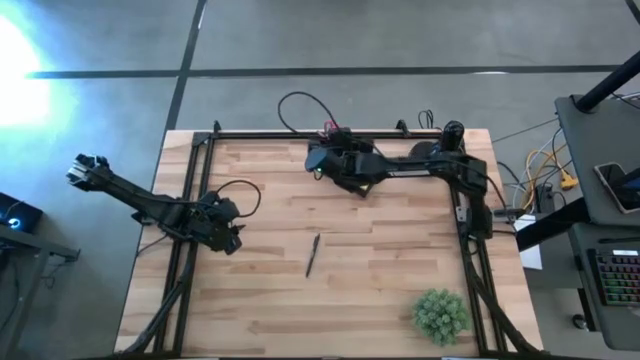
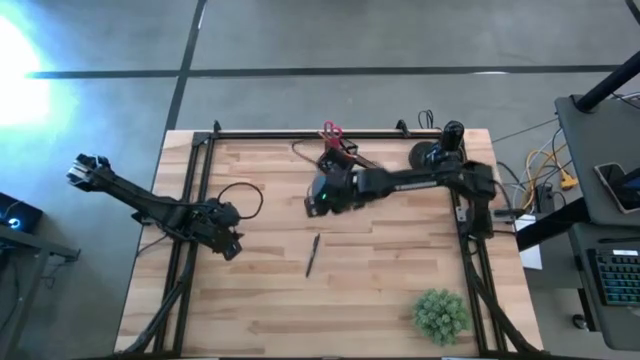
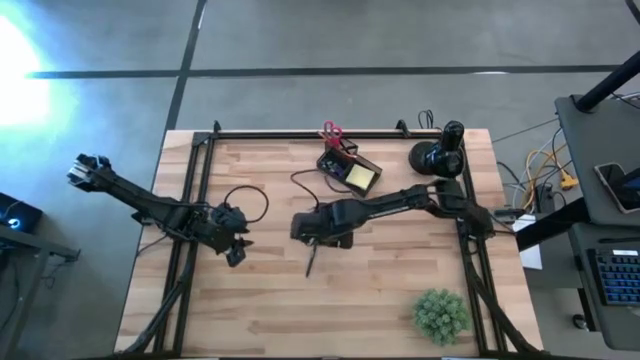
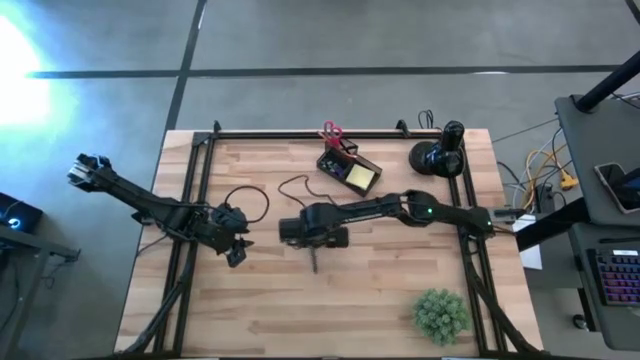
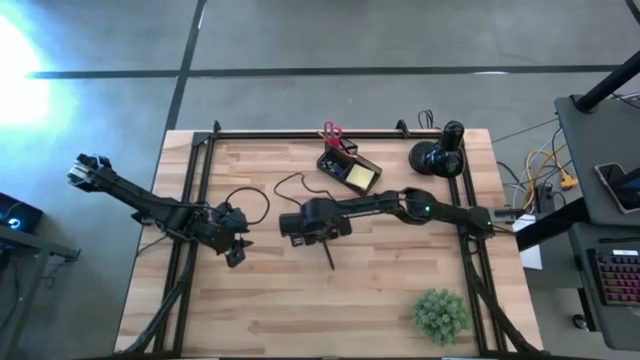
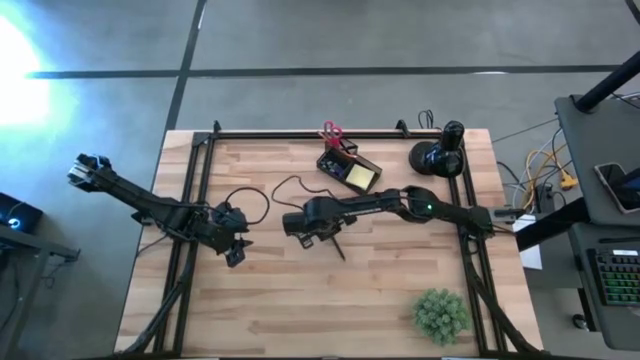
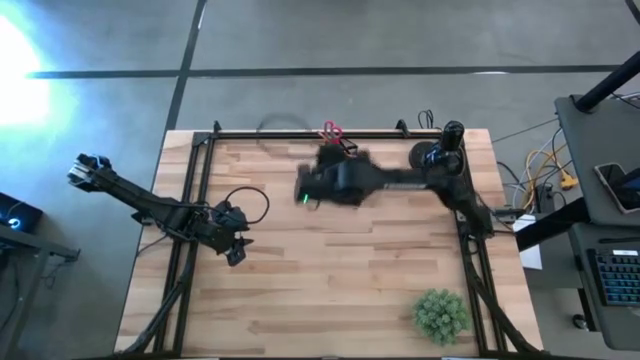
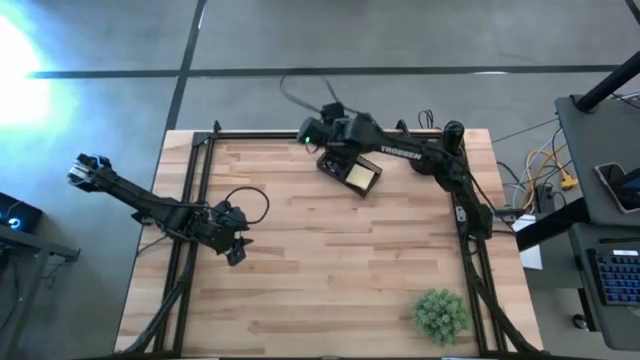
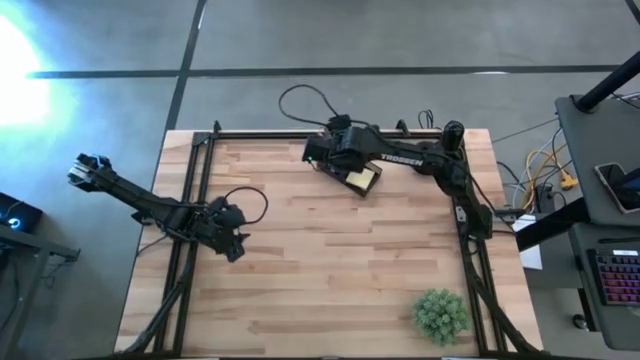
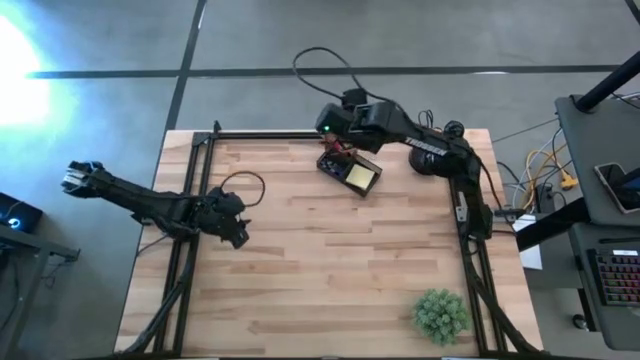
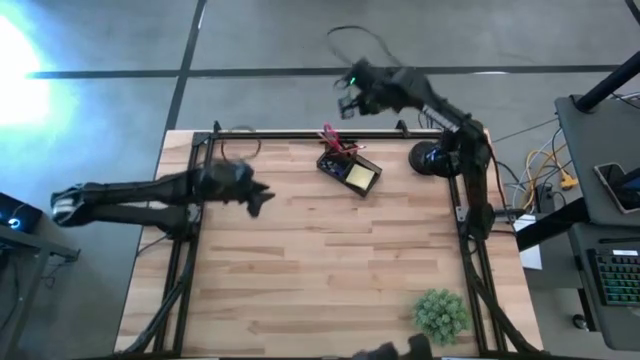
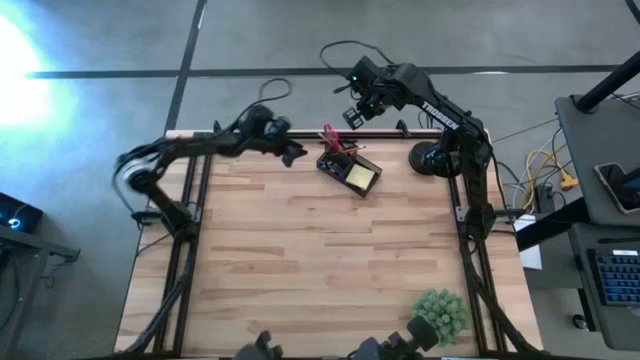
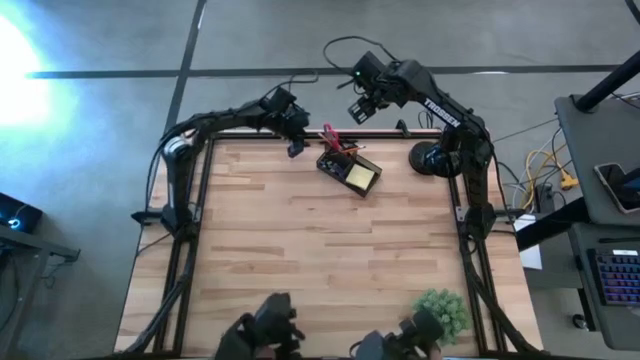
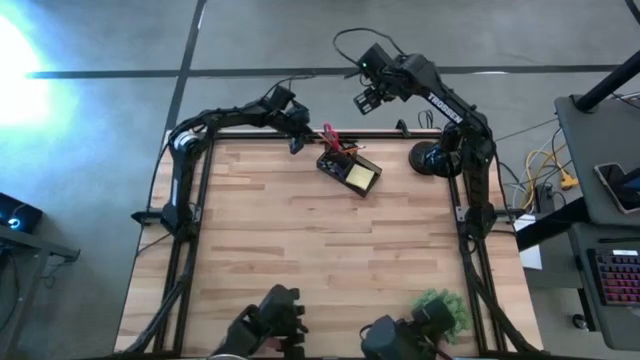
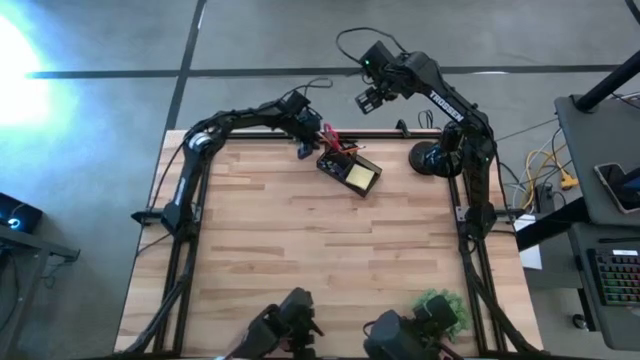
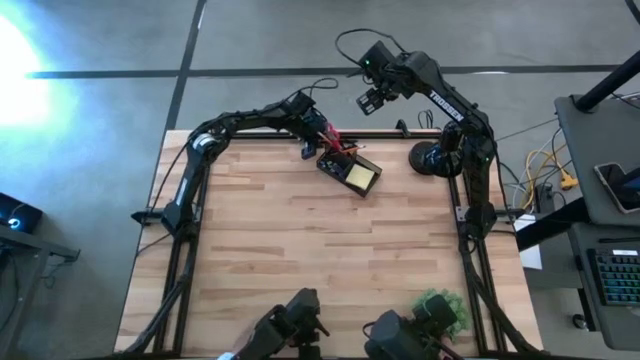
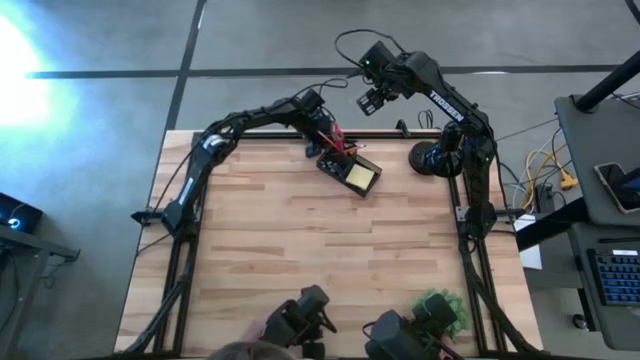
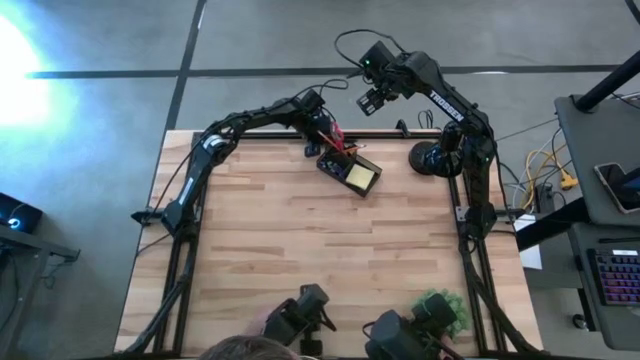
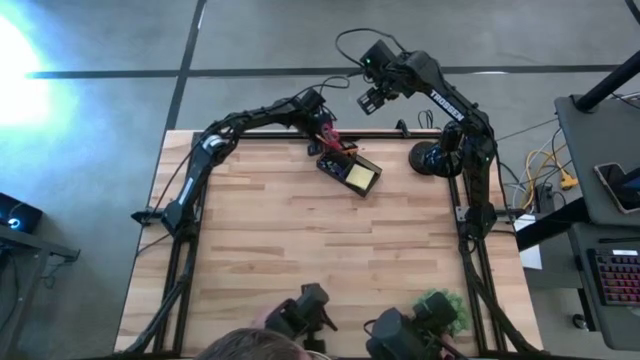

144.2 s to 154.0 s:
Task: Pick and place office supplies into organizer
Put the pen into the desk organizer

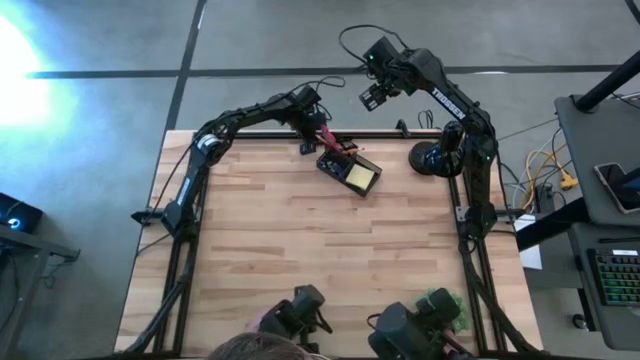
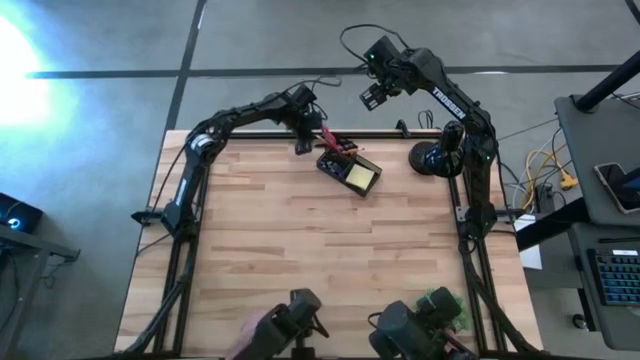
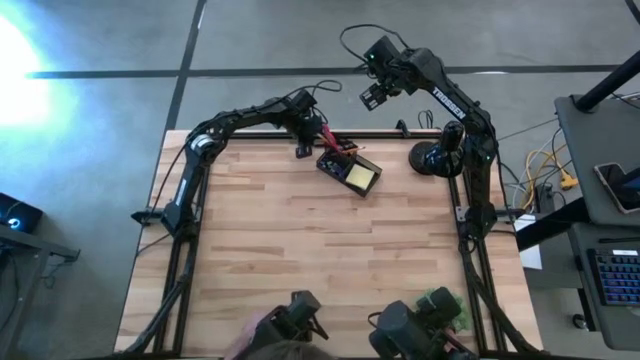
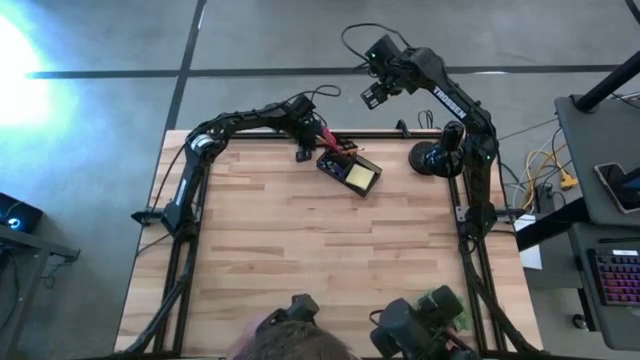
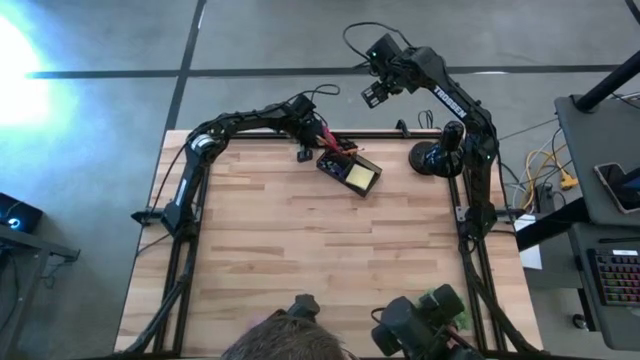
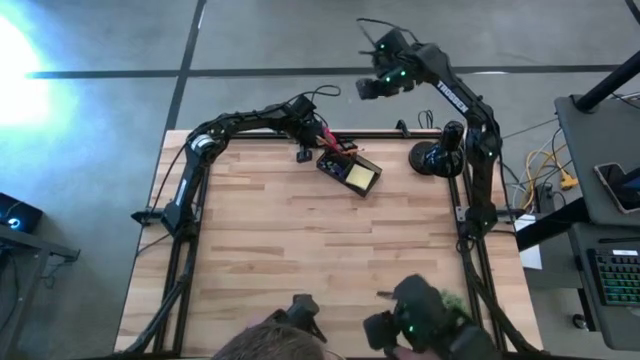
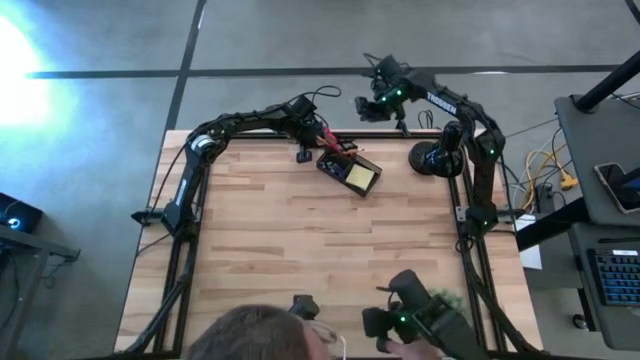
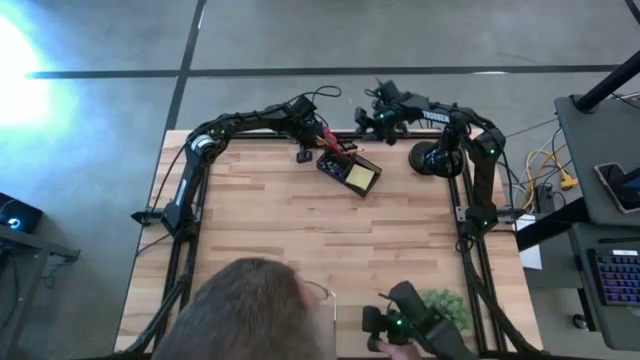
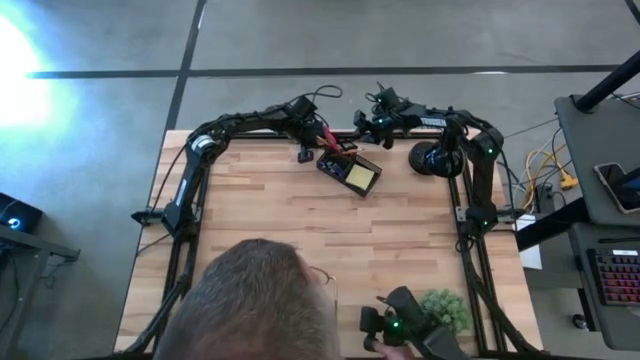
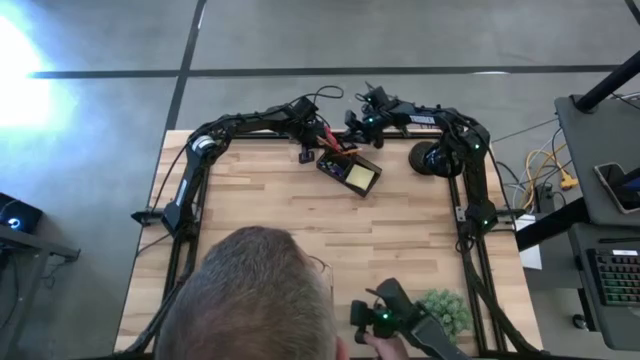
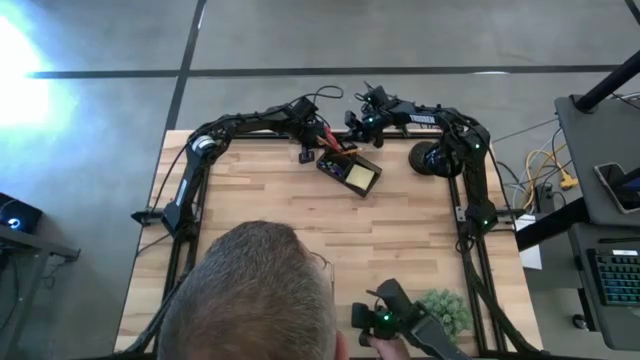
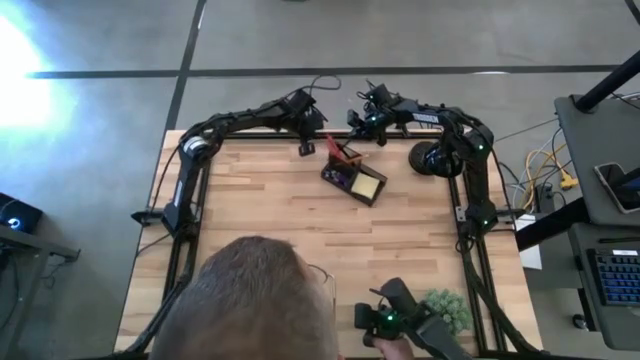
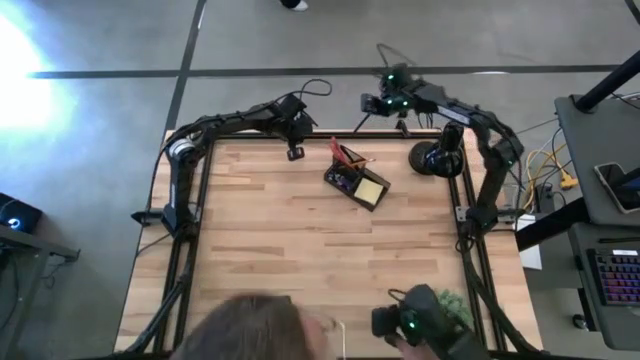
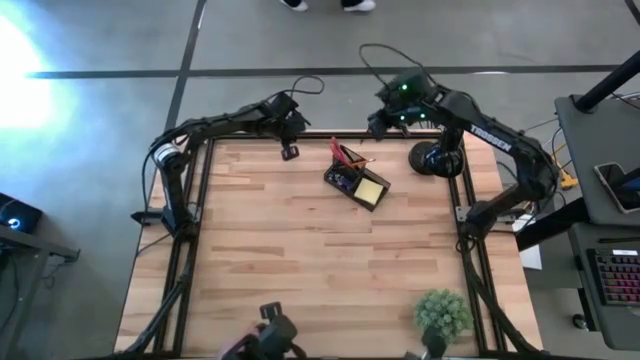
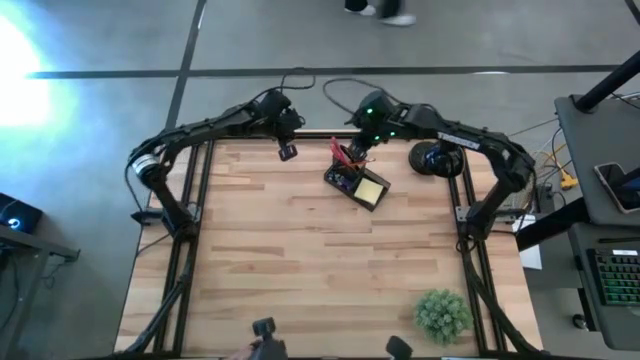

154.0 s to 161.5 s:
Put the pen into the desk organizer

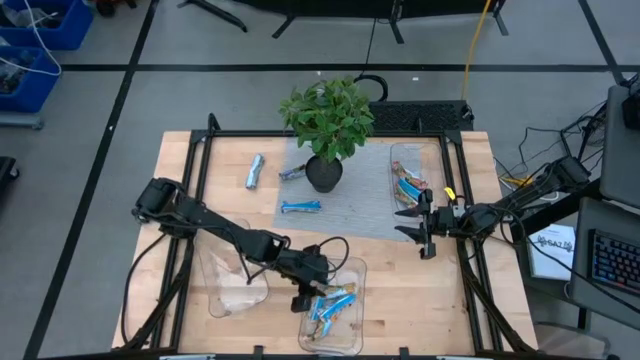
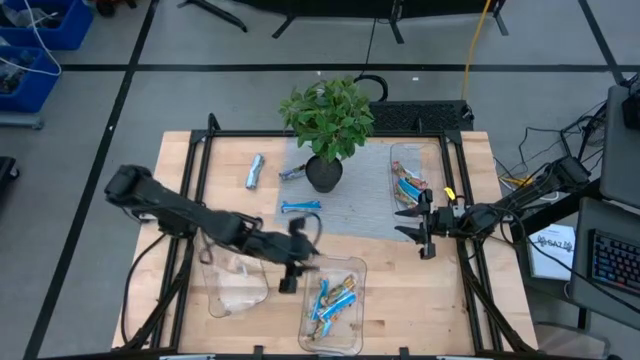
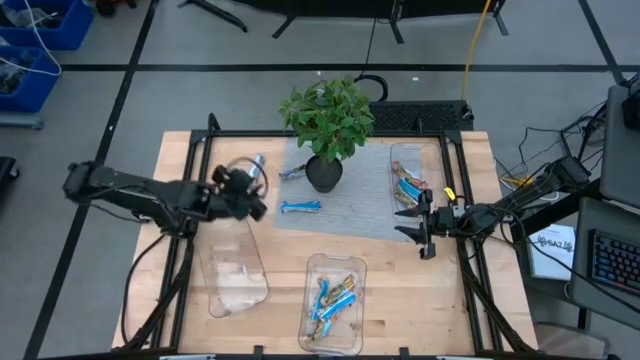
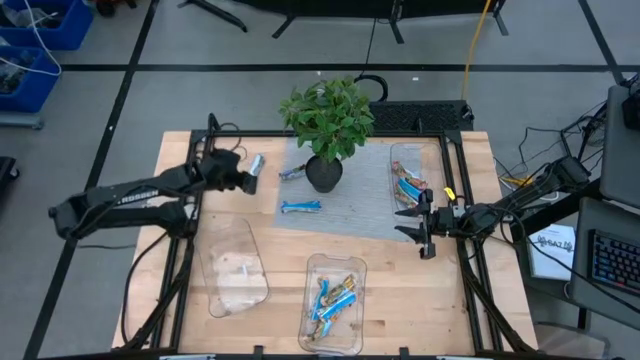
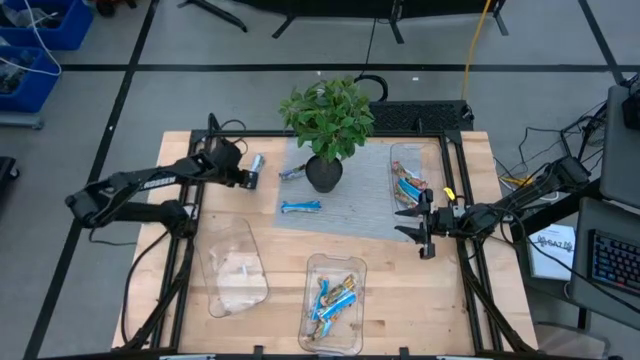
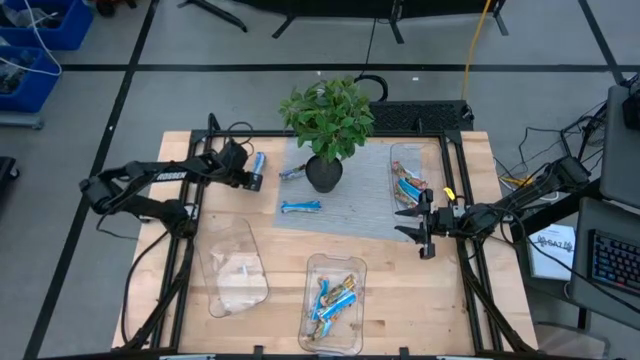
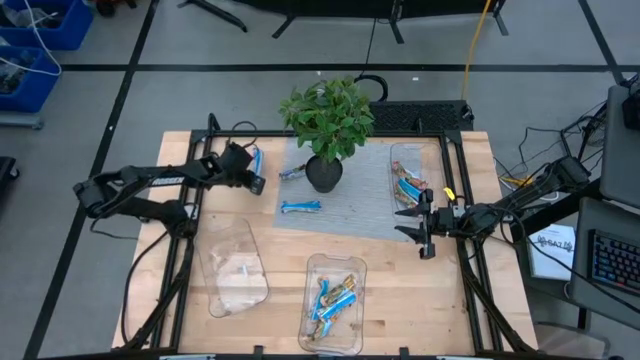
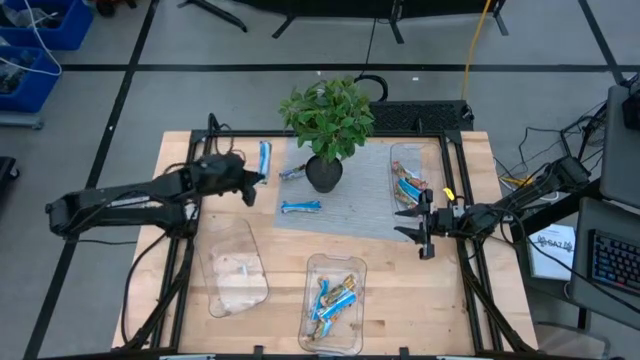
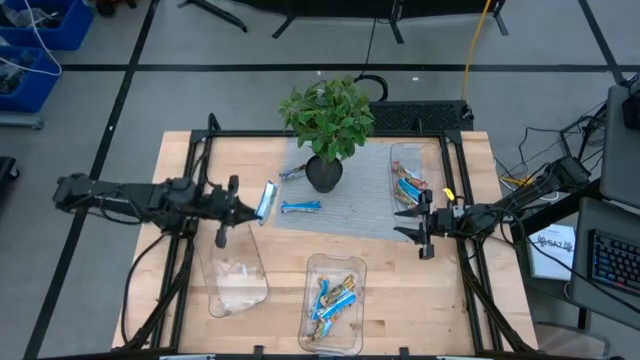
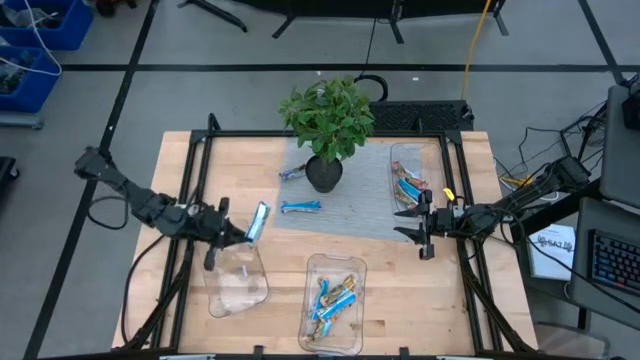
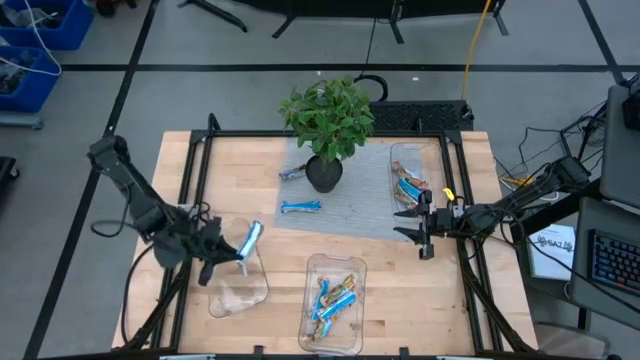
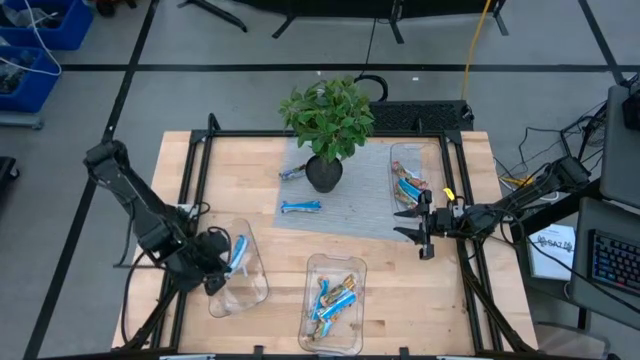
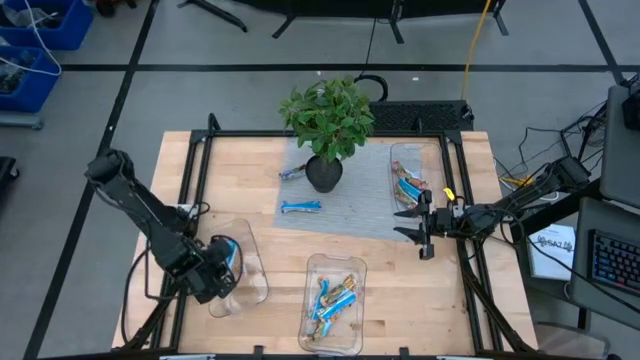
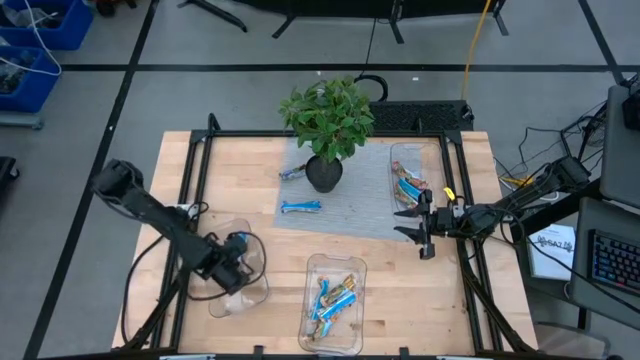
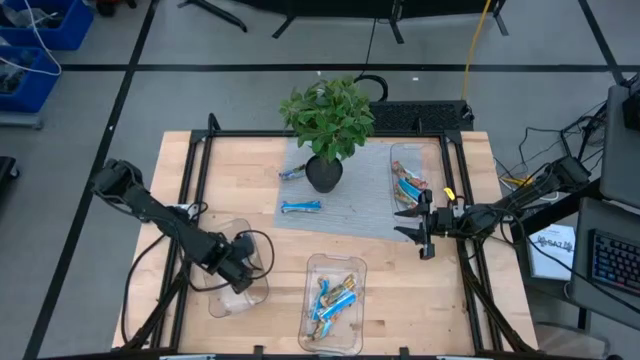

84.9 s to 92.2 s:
Task: Pick and place Granola Bars by type
Put the top left blue granola bar into the left transparent bin
